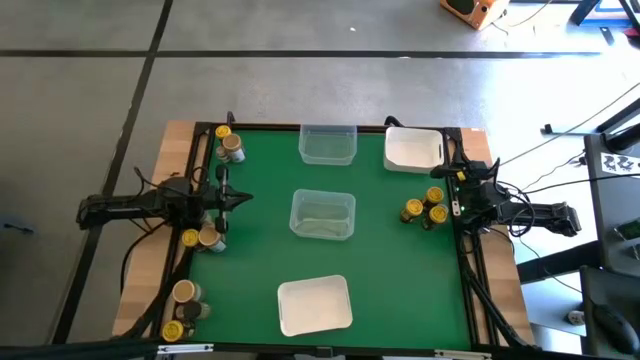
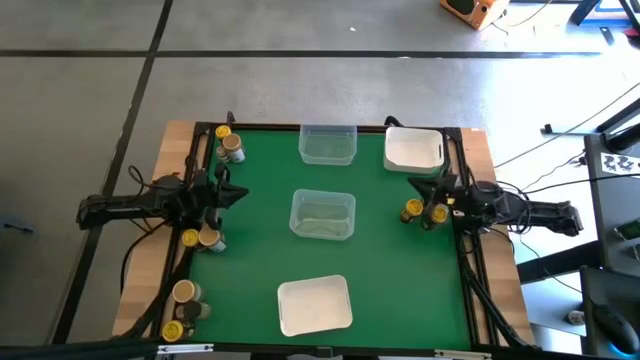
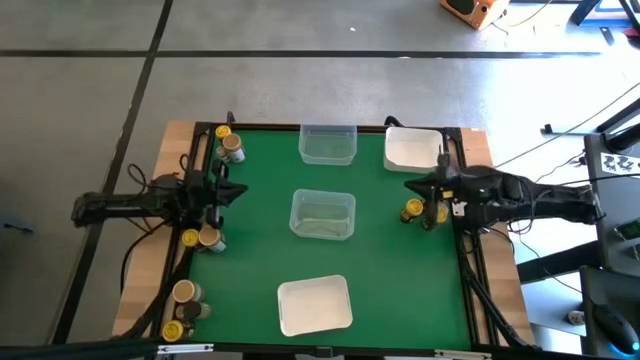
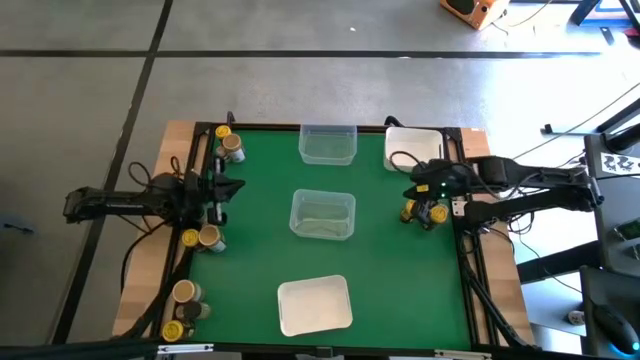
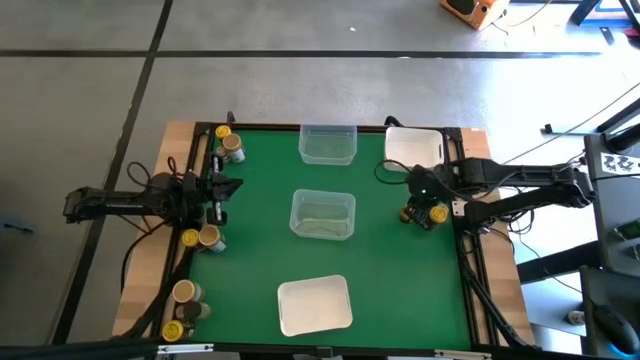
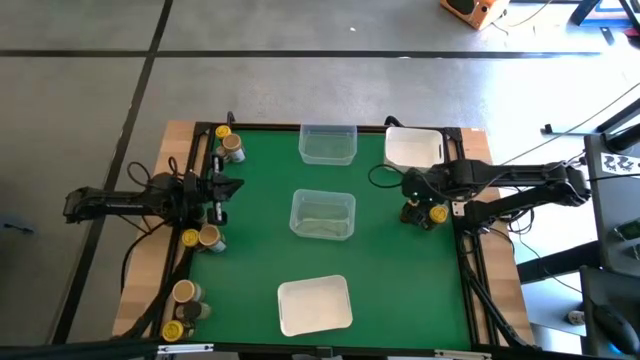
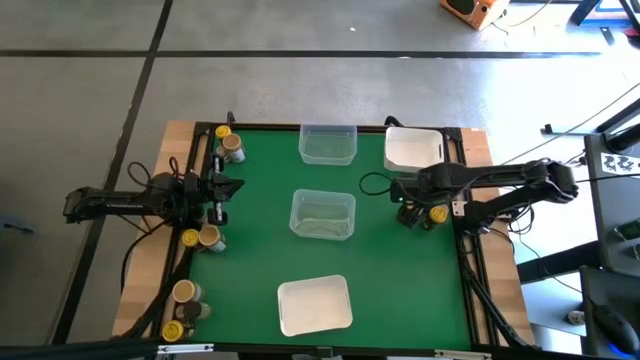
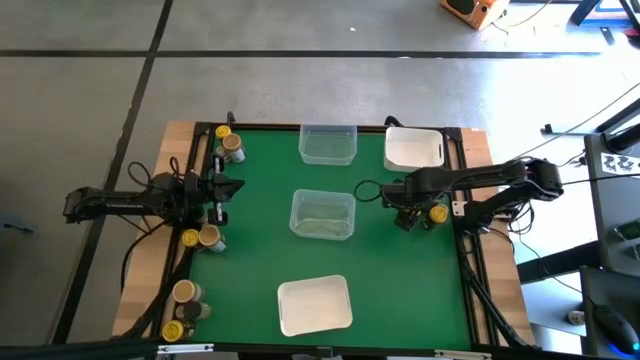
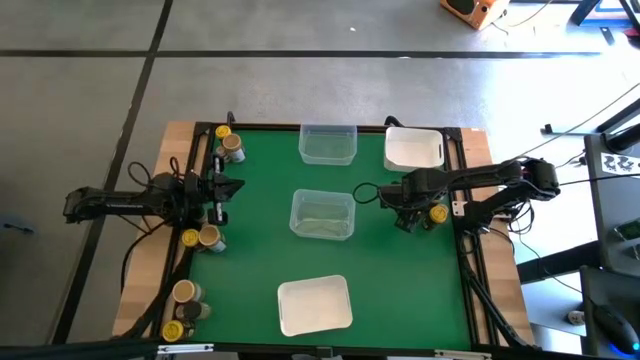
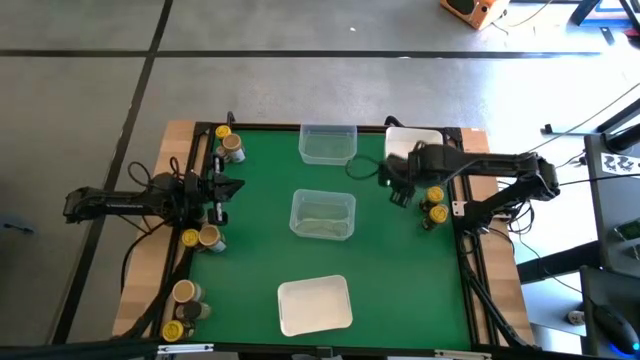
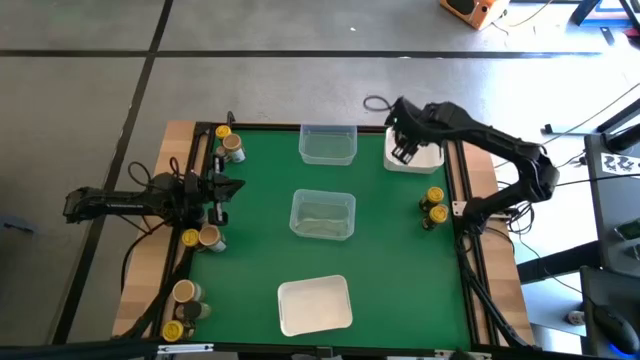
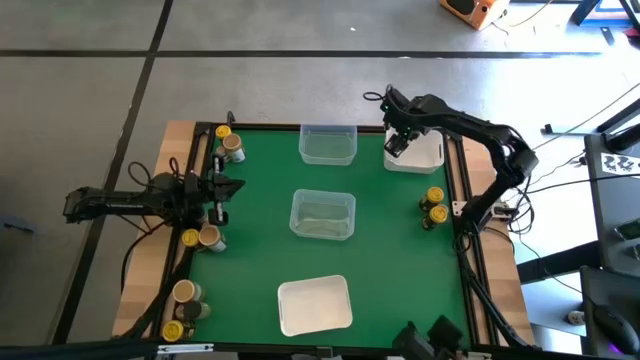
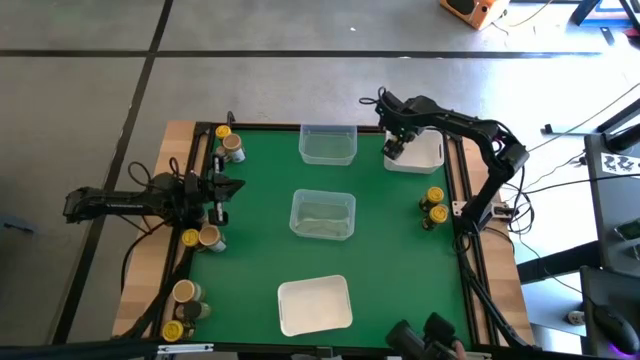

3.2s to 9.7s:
Task: Sort spices by type
Put the yellow seasoning bottle into the top white bin

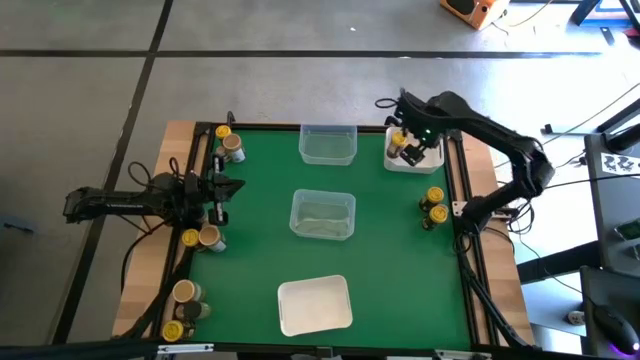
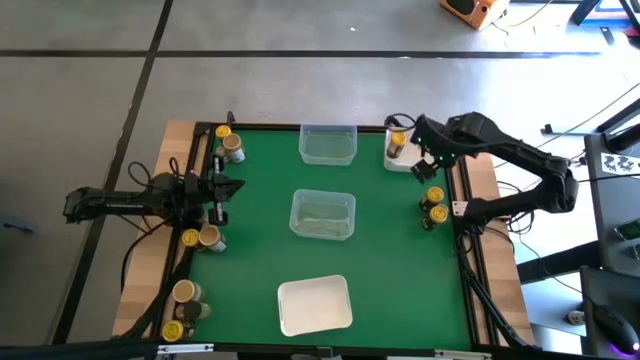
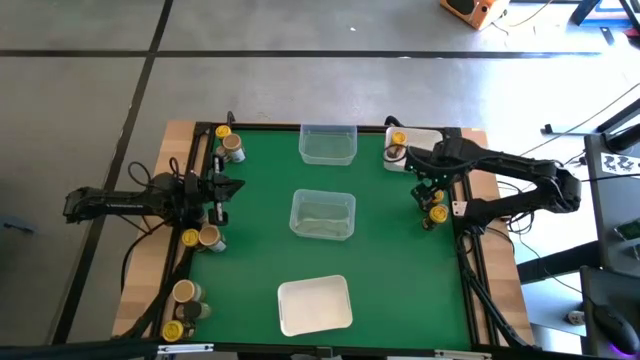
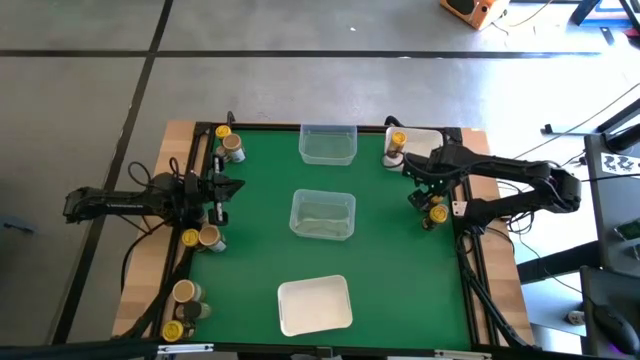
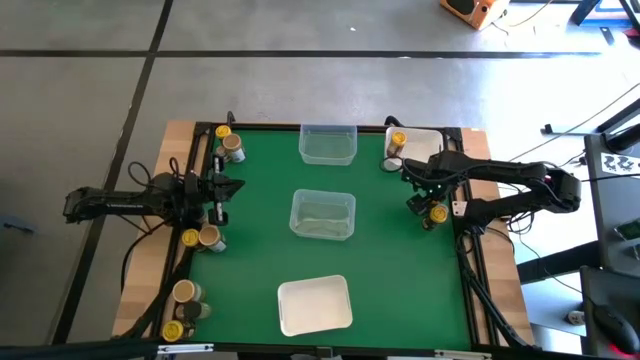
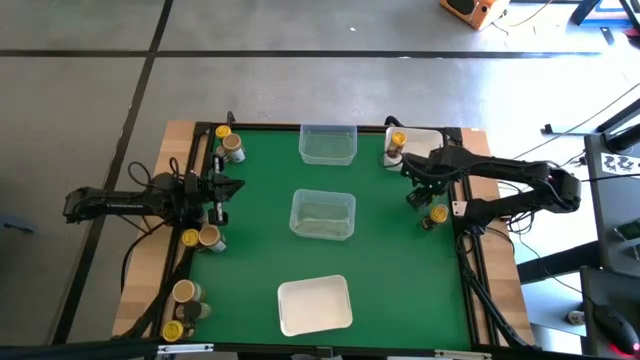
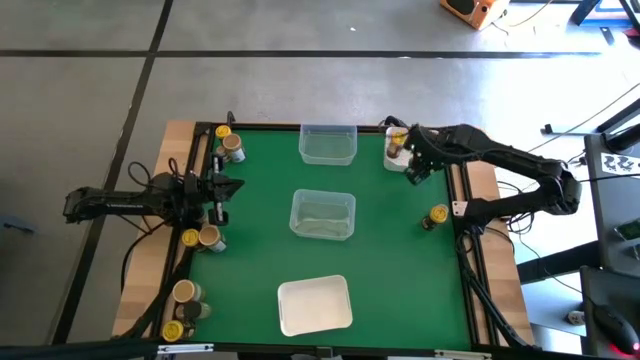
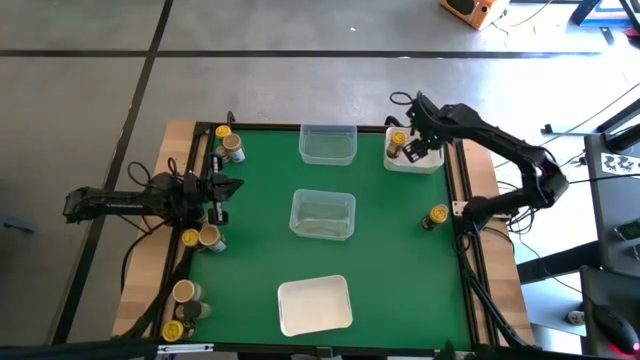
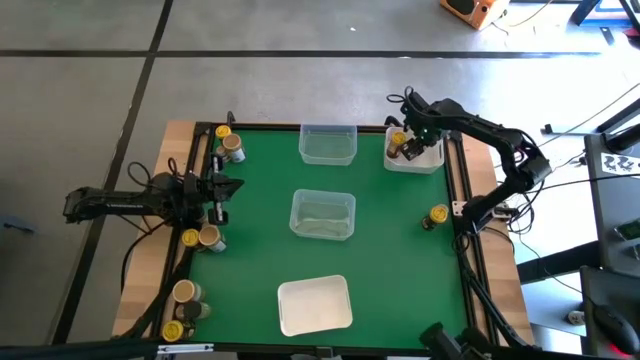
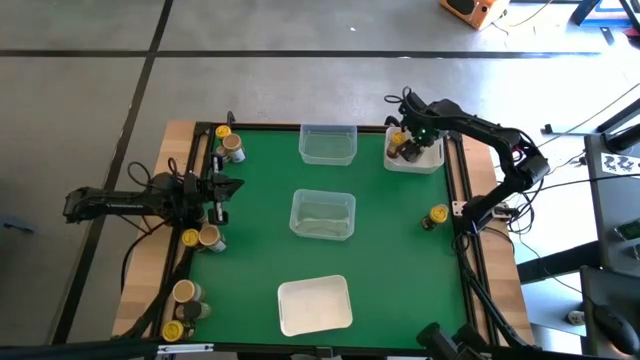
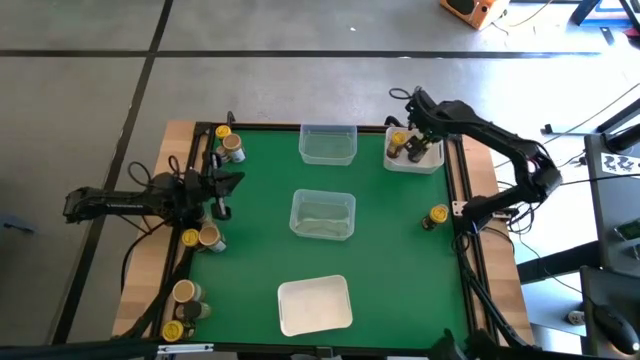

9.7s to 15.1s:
Put the yellow seasoning bottle into the top white bin

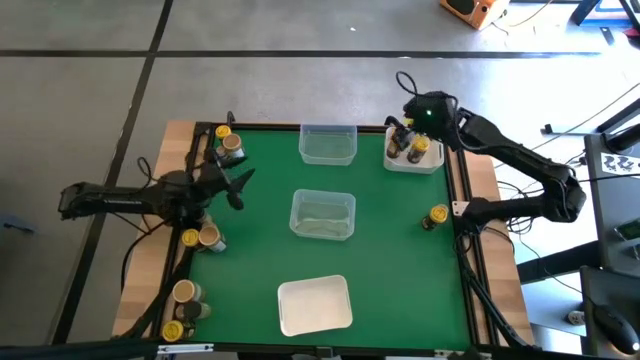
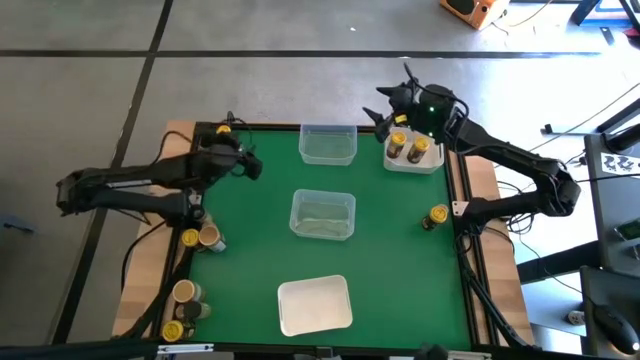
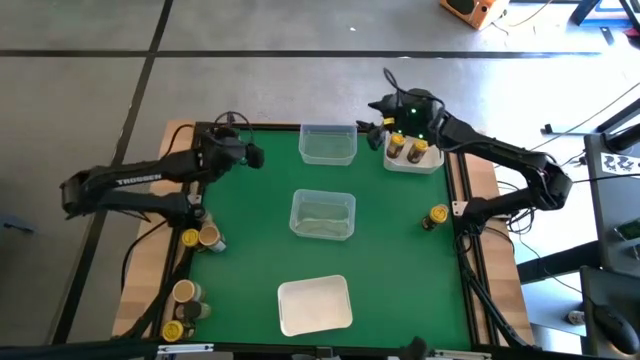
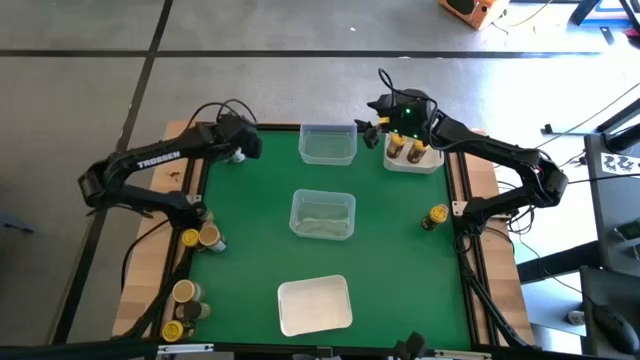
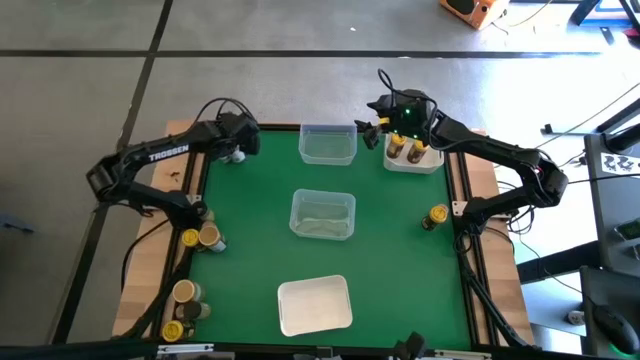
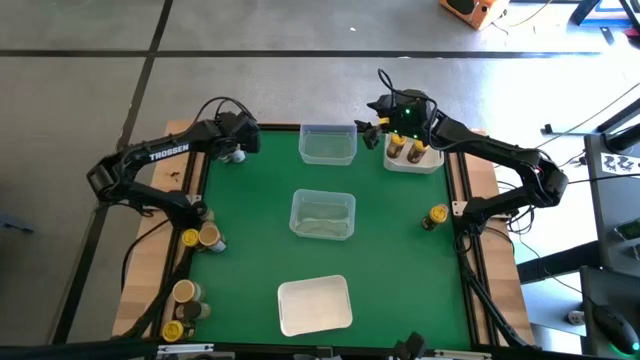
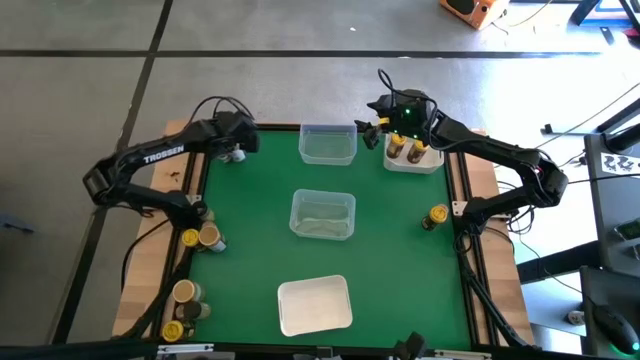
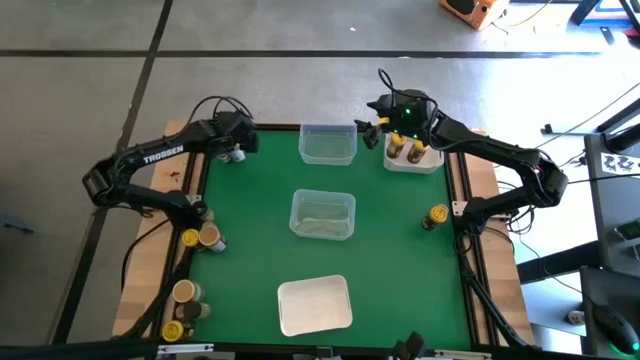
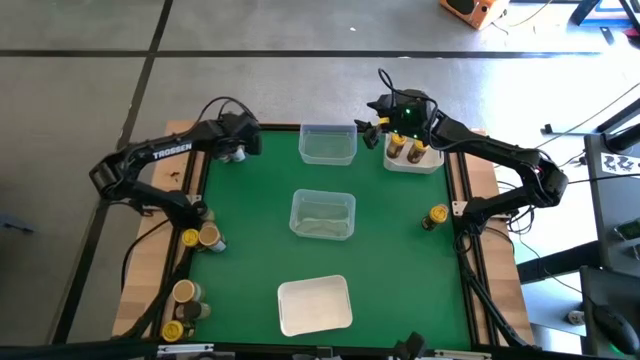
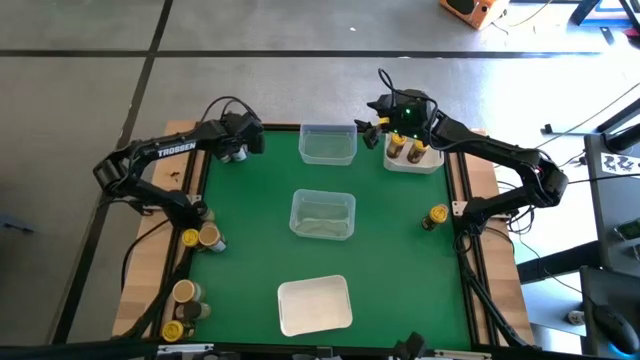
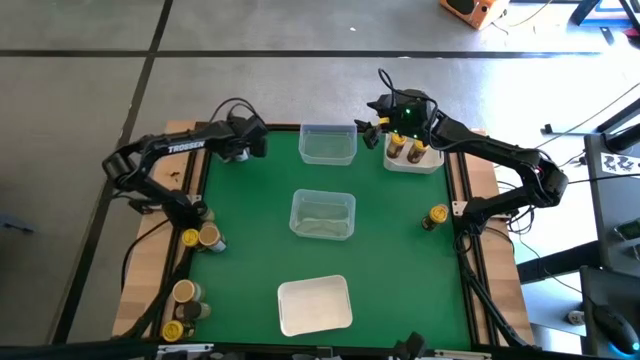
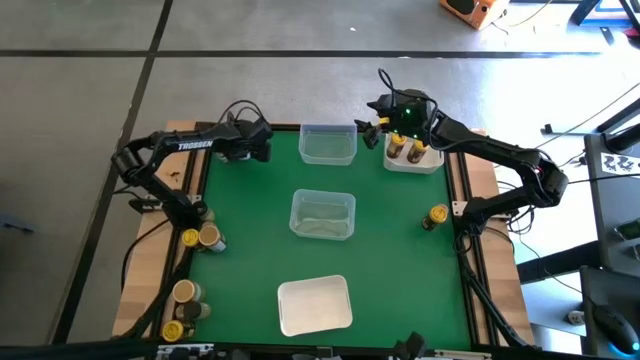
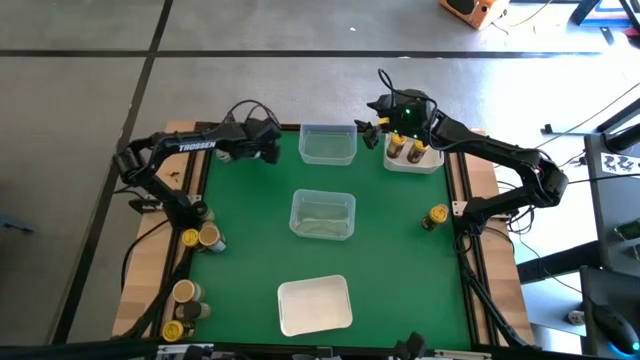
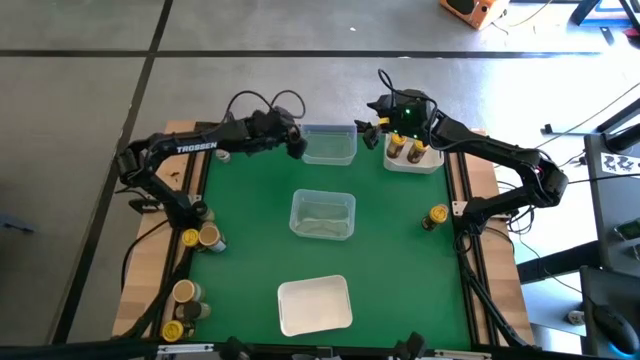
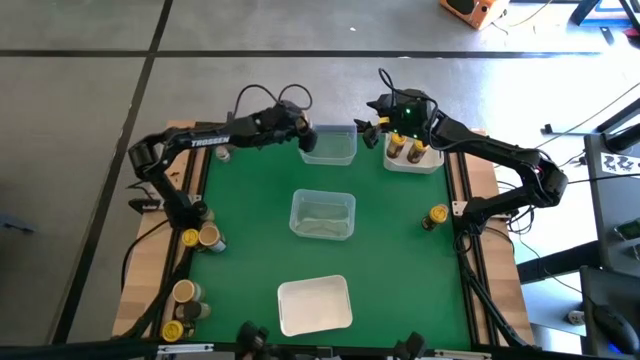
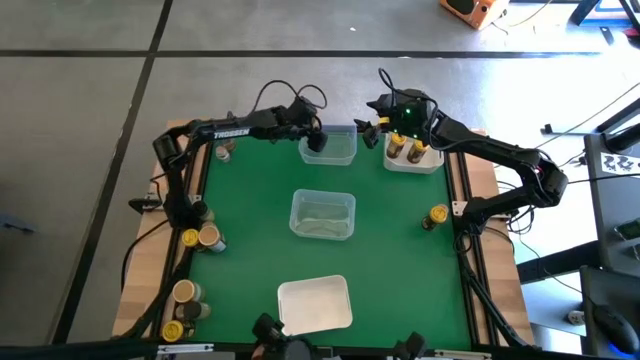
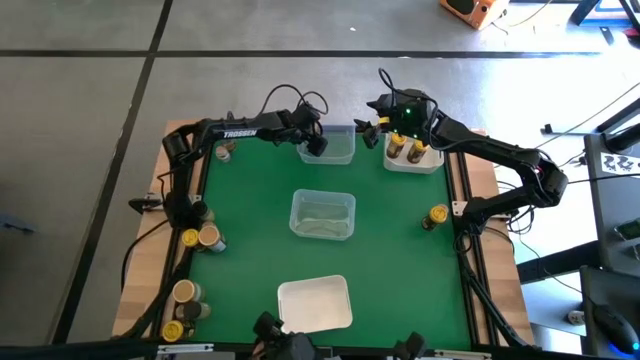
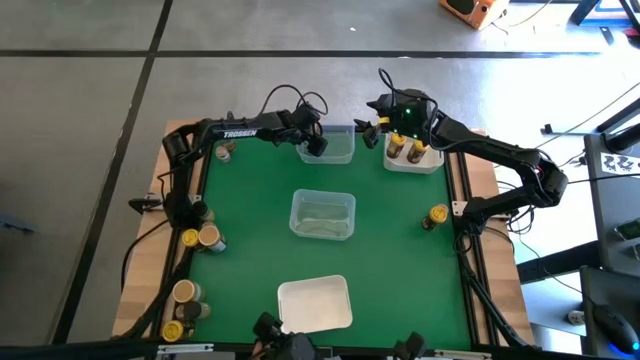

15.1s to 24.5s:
Put the brown seasoning bottle into the top transparent bin

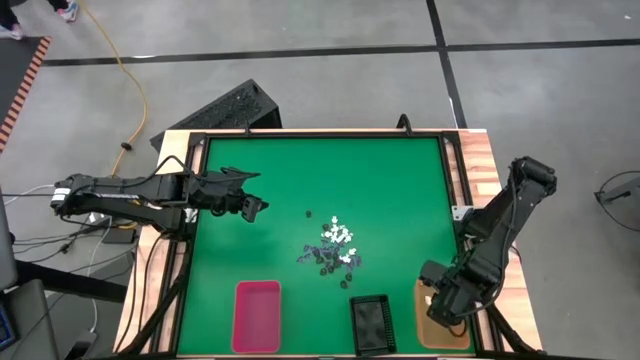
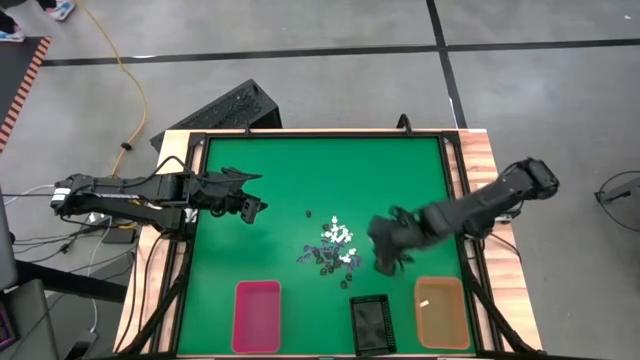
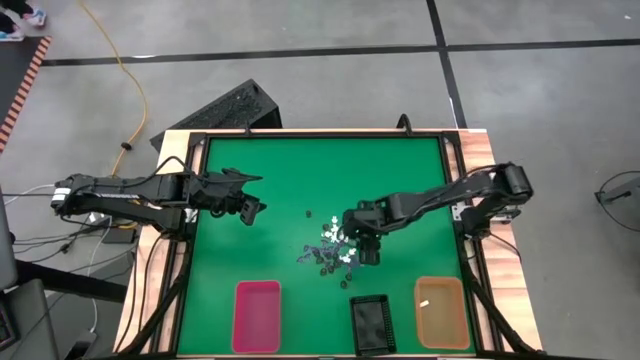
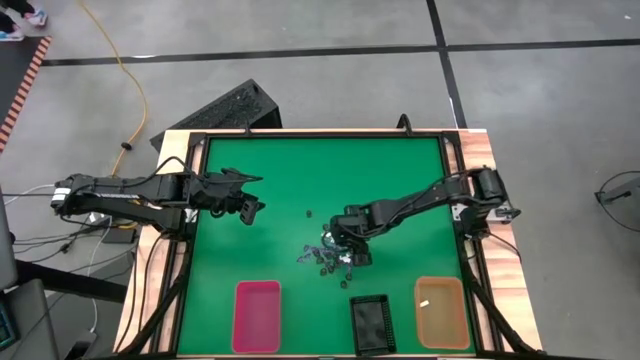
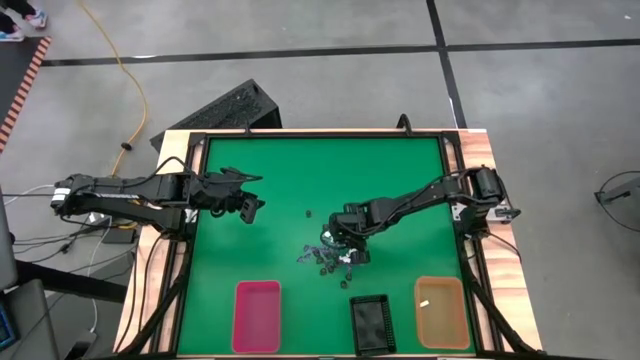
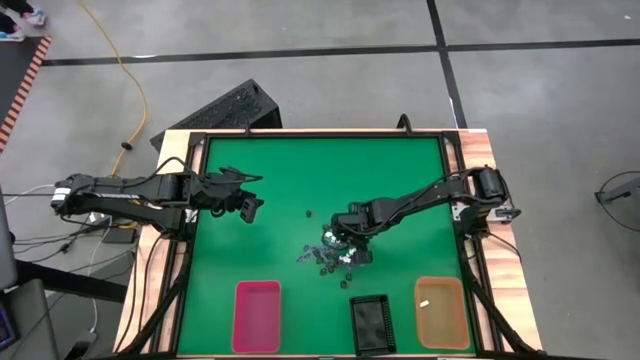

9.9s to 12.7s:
Task: Sort Halloween decoration
Put the white skeleton toy into the right orange organizing bin
